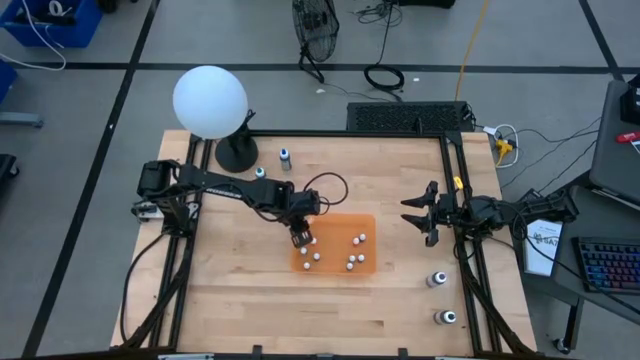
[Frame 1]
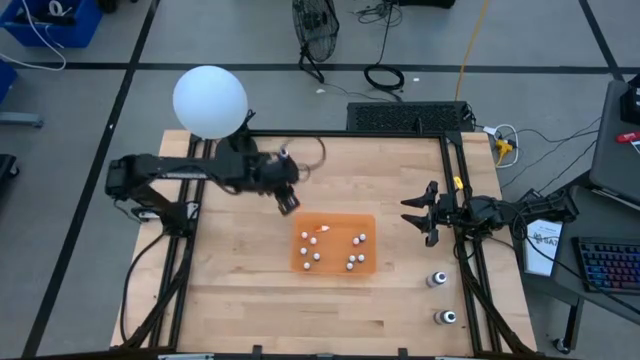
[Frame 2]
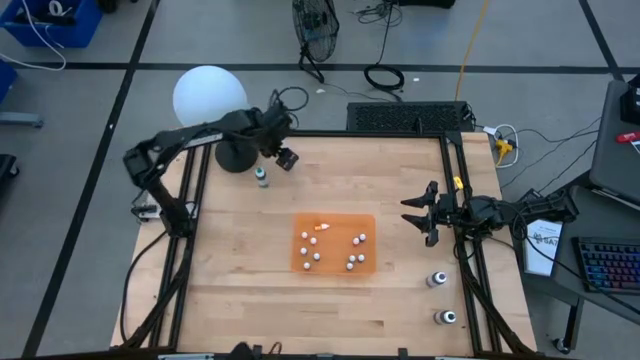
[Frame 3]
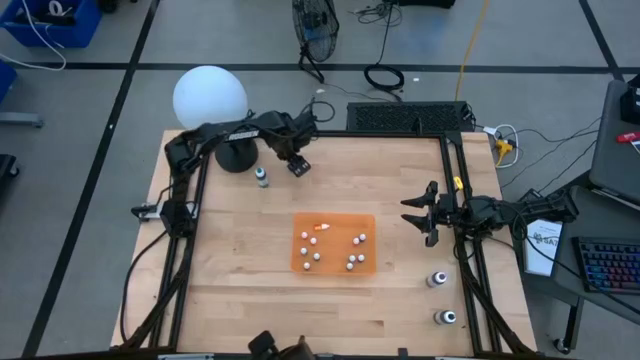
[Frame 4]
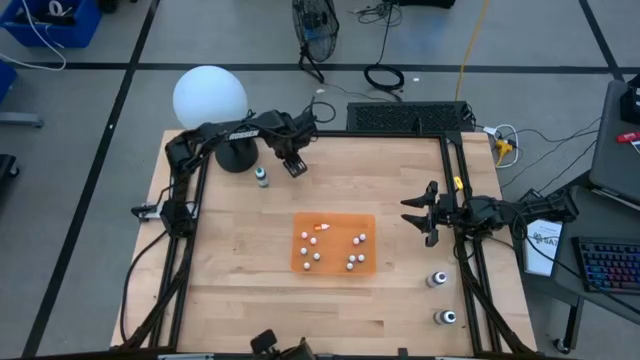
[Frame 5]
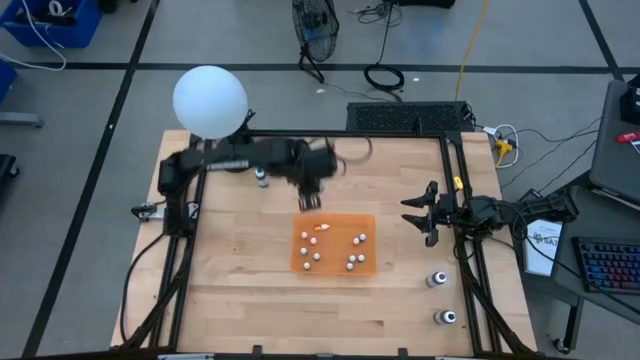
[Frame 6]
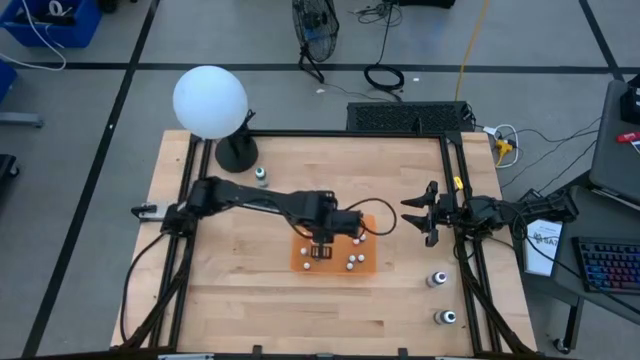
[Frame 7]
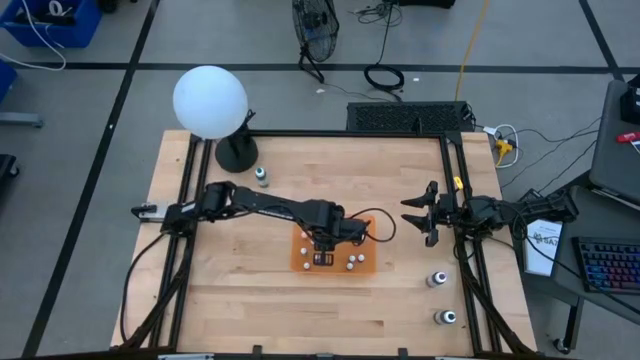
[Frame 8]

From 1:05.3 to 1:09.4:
Task: Pick & Place food coloring
Put the large blue food coloring bottle into the container

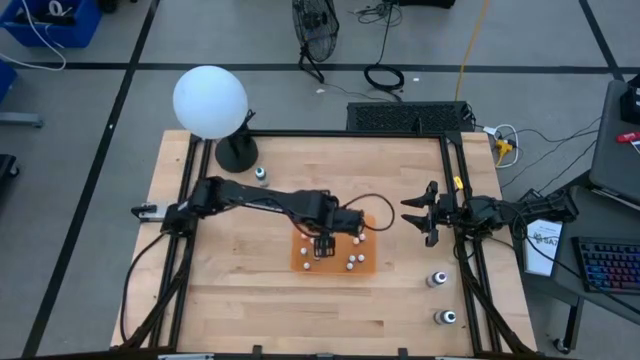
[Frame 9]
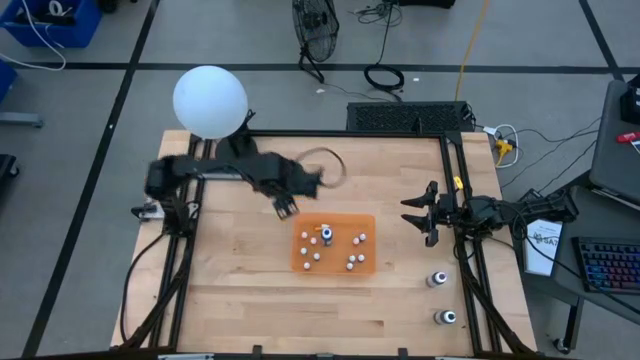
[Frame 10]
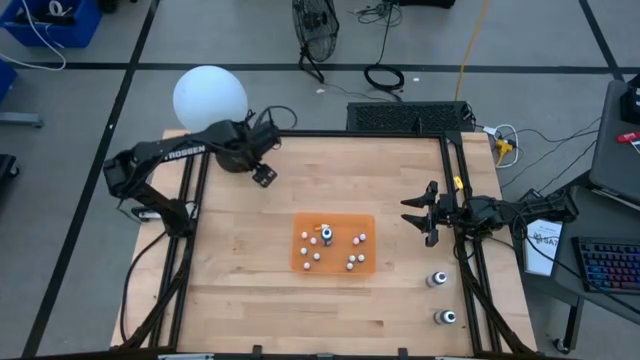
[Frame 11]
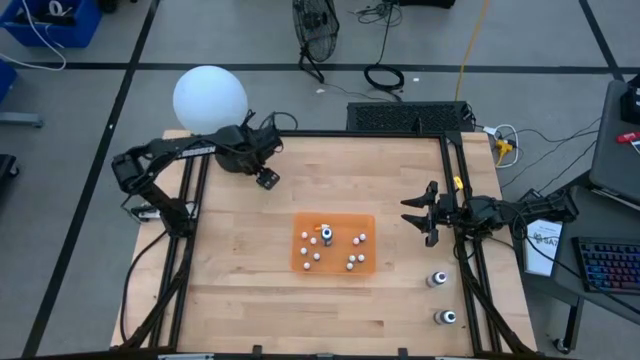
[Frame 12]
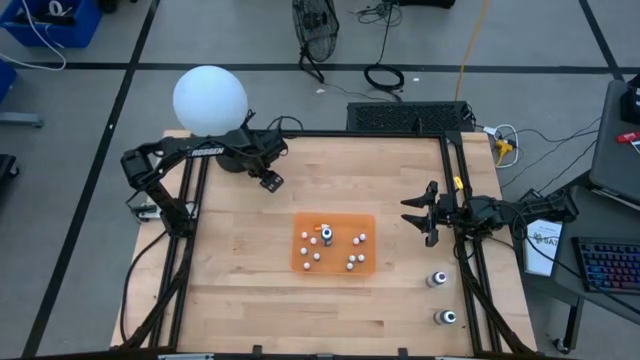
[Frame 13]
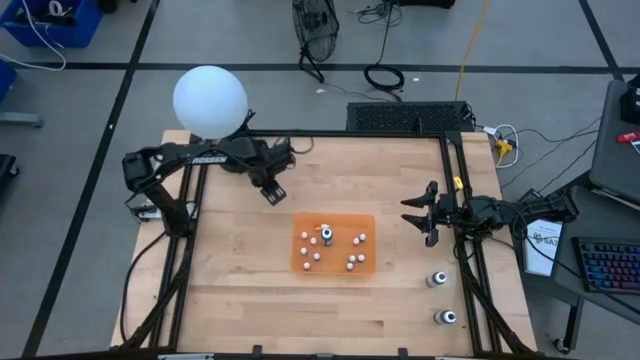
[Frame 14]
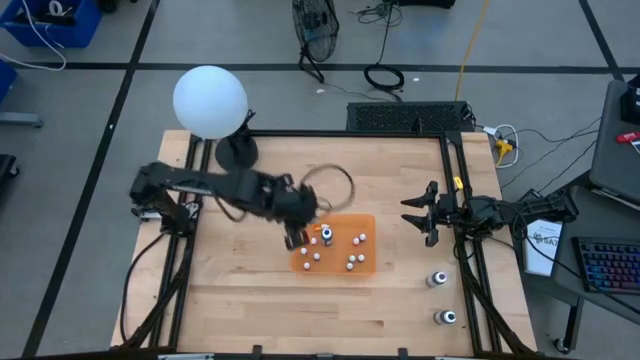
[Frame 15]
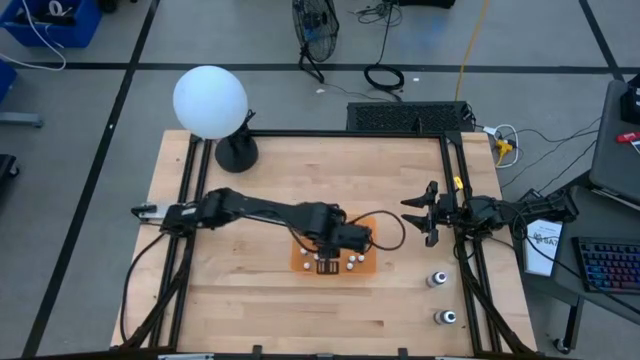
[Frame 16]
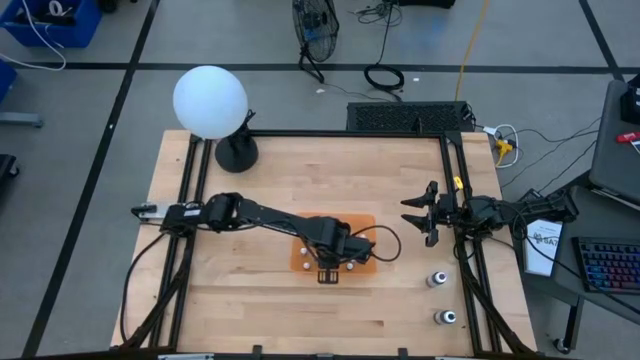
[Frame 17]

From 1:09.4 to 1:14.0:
Put the large green food coloring bottle into the container

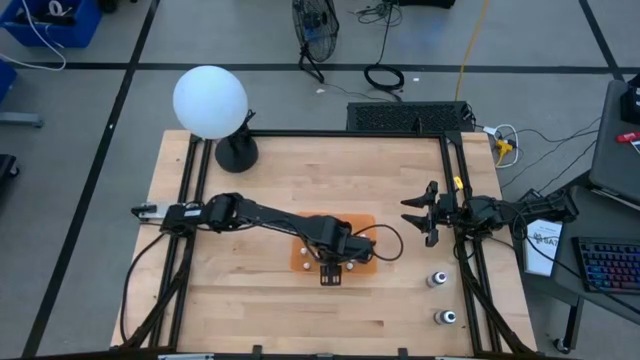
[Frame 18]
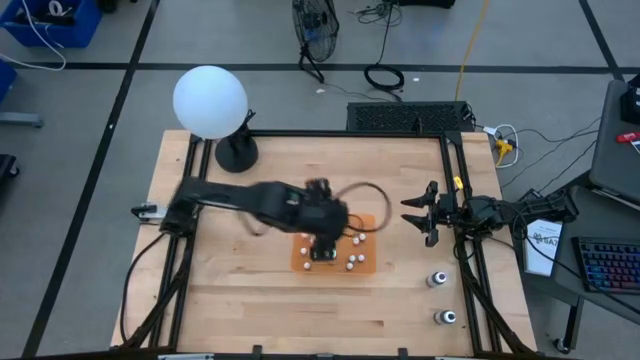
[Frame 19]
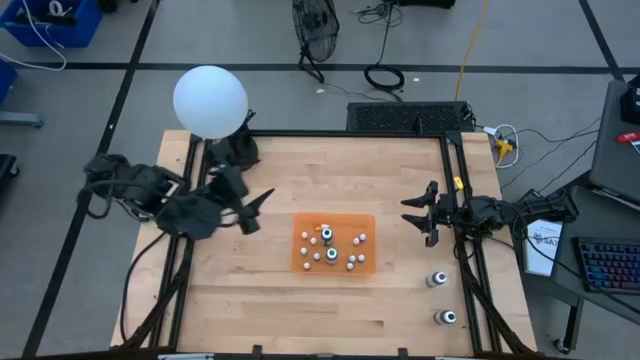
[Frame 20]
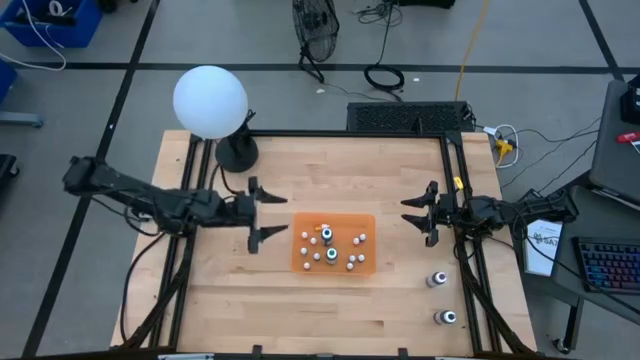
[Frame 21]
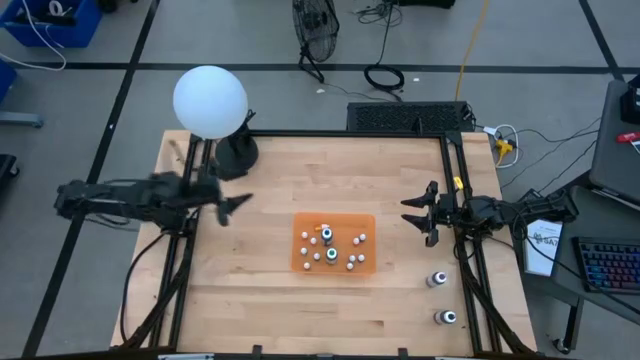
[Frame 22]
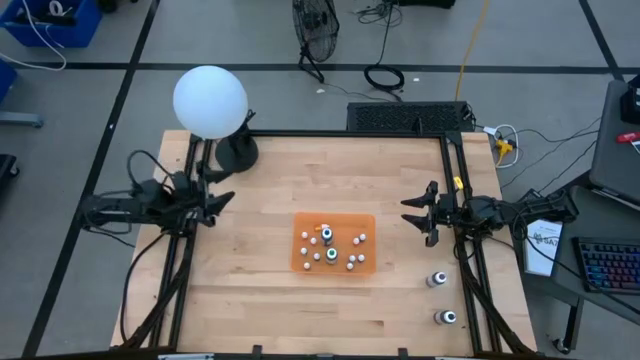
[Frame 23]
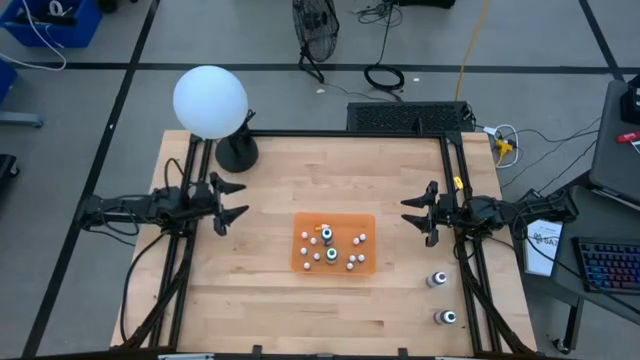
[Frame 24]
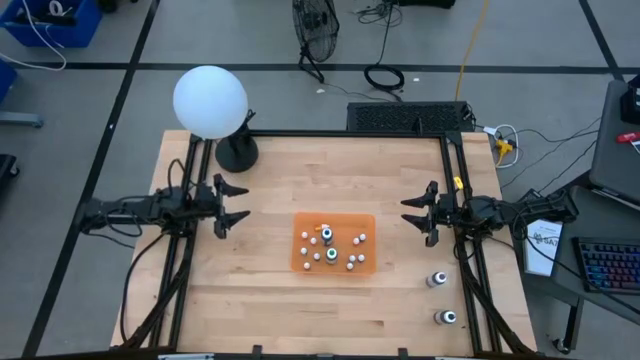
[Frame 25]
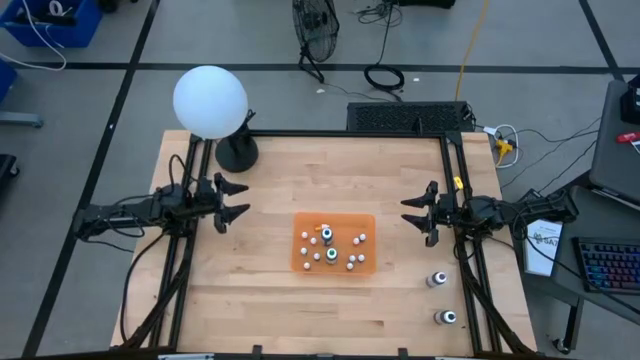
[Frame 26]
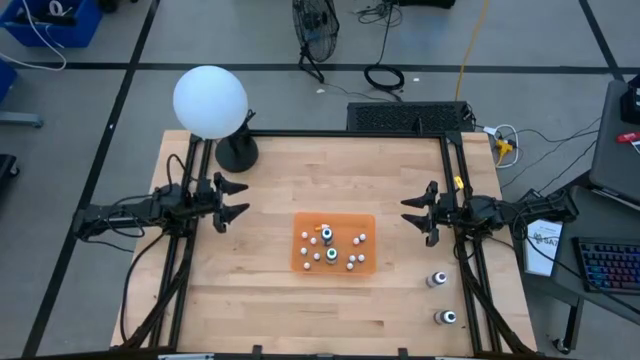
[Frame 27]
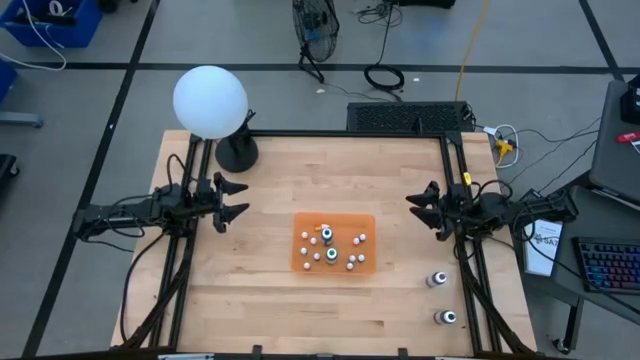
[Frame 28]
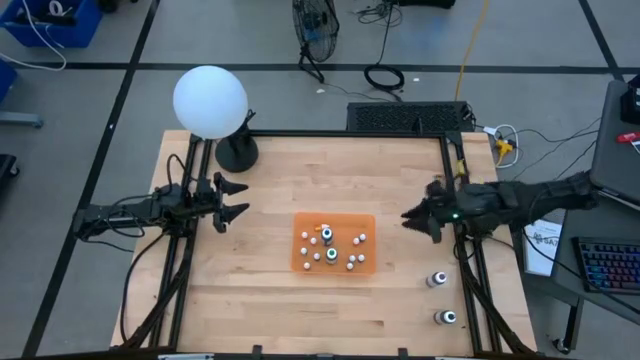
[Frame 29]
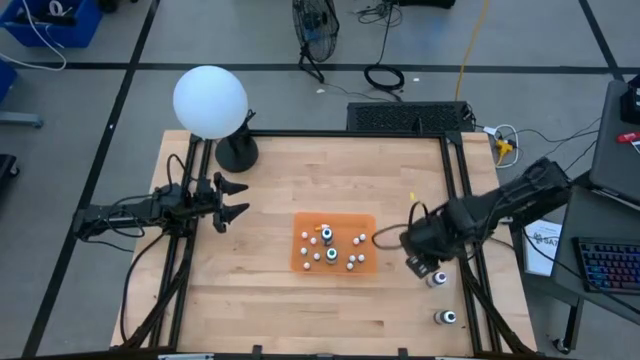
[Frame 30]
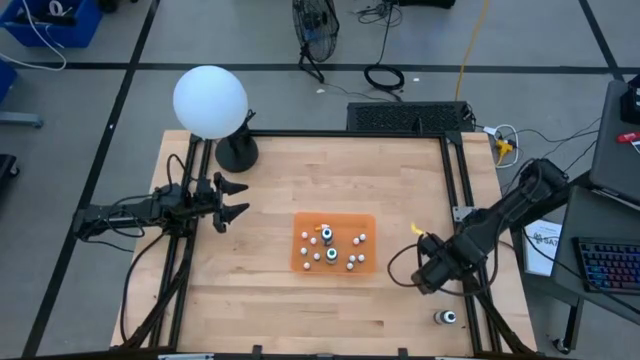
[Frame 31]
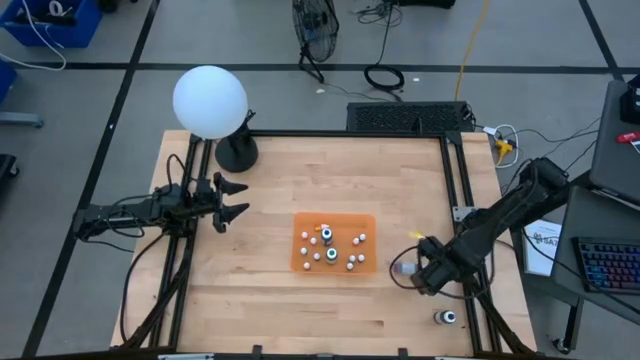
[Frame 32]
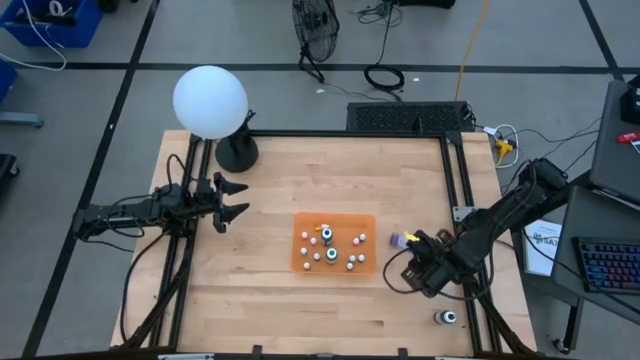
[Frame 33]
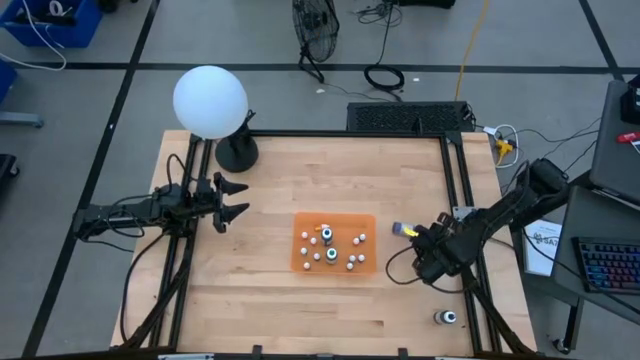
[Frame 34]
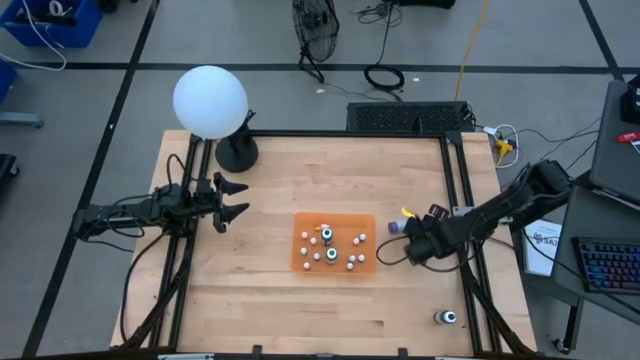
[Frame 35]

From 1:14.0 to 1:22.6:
Put the large purple food coloring bottle into the container

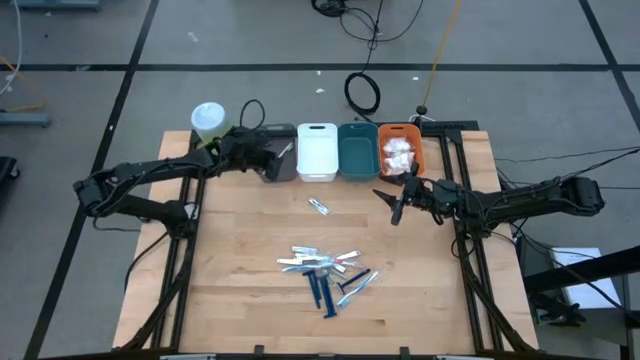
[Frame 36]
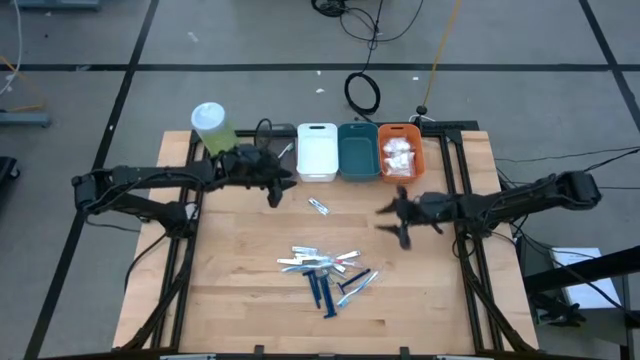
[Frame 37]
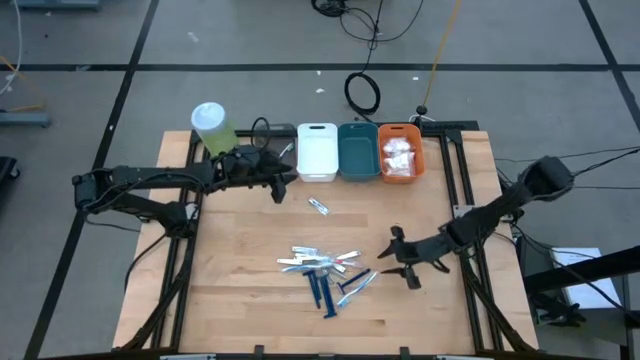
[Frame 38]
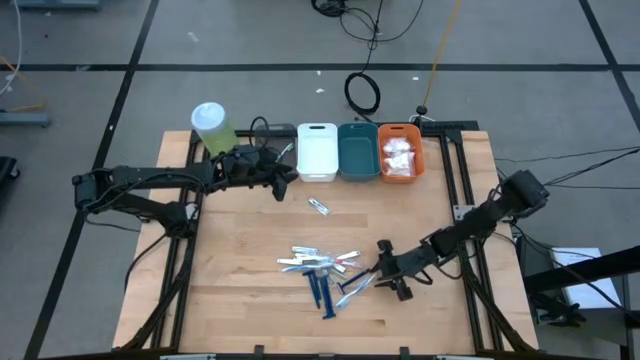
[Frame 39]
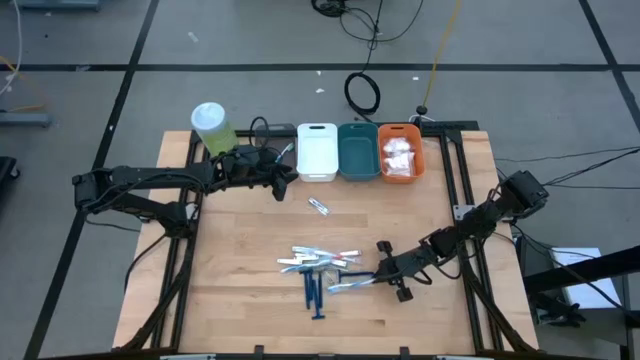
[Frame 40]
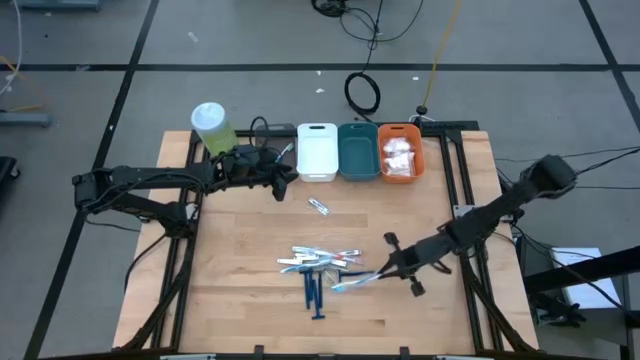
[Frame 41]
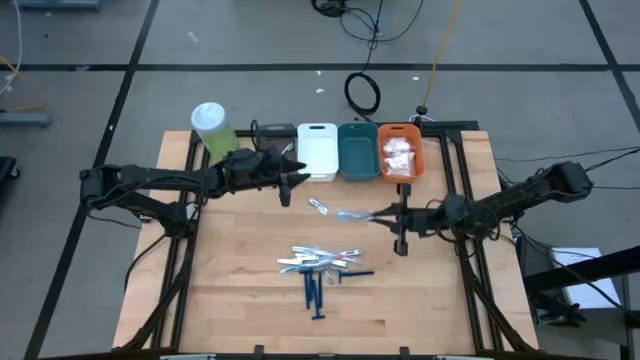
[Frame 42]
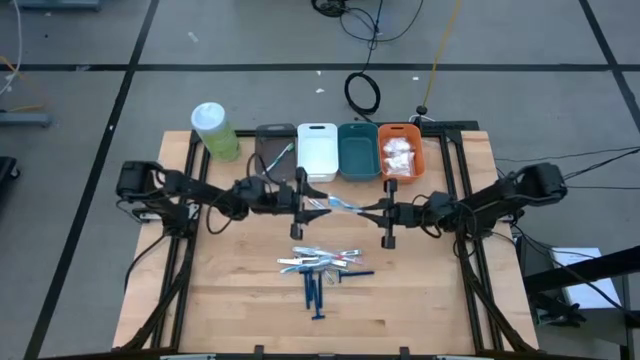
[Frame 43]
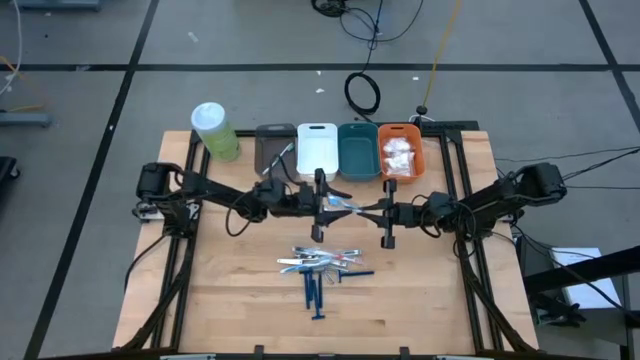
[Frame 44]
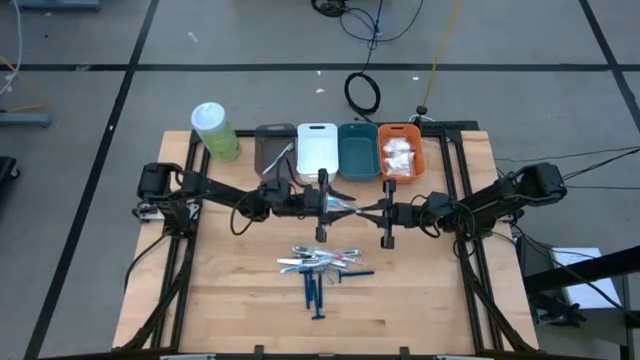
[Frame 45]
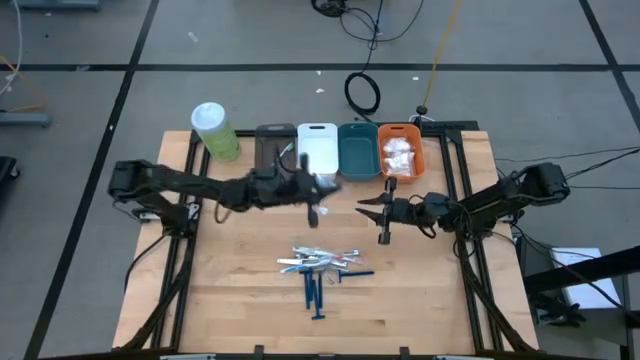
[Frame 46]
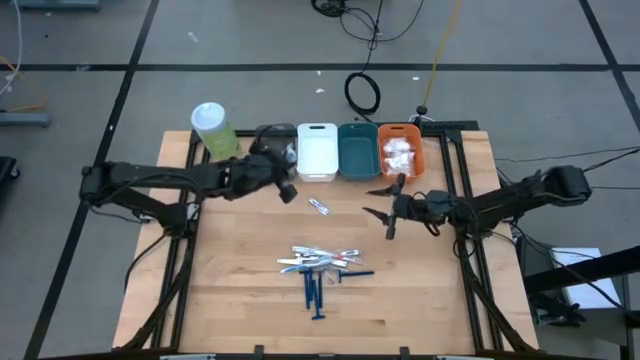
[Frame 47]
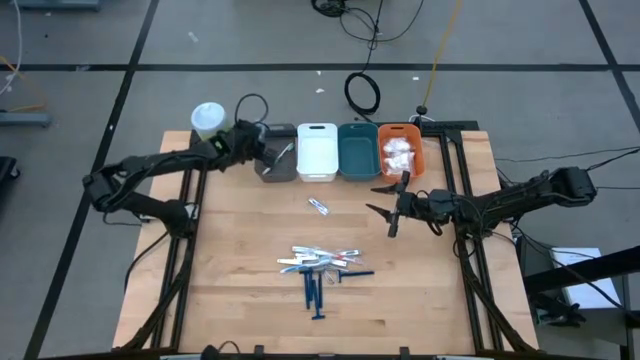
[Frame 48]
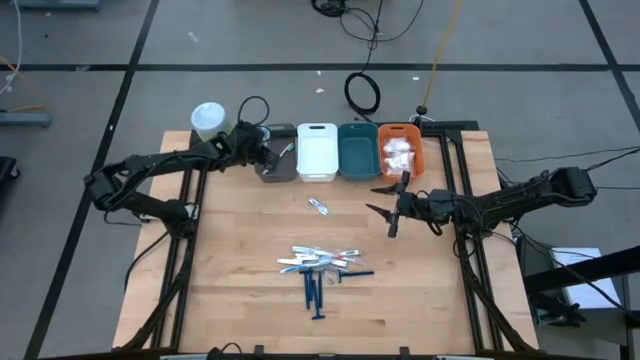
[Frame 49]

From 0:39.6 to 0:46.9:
Task: Pick & Place Travel size toiletries
Put the blue toothbrush into the black bin
